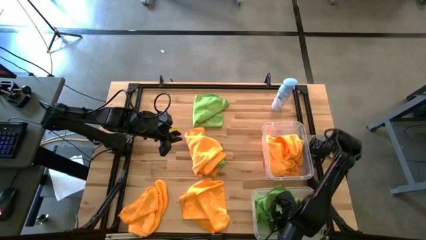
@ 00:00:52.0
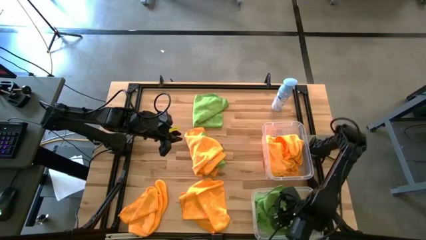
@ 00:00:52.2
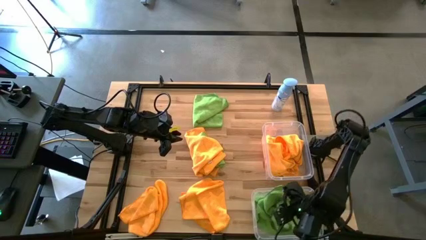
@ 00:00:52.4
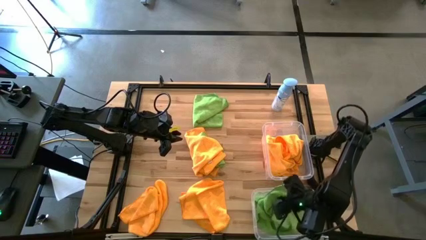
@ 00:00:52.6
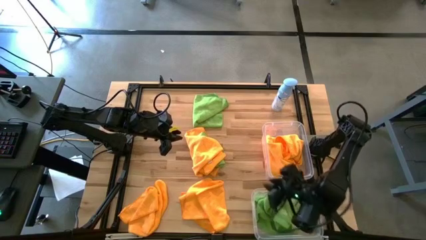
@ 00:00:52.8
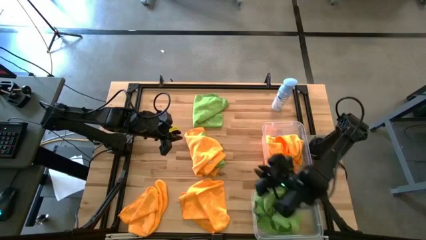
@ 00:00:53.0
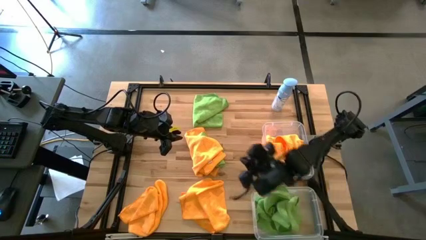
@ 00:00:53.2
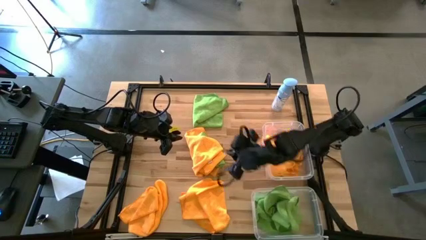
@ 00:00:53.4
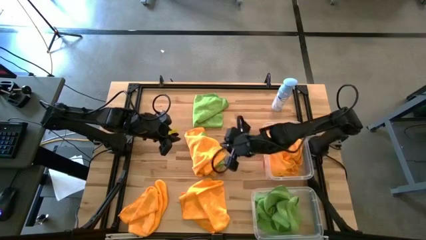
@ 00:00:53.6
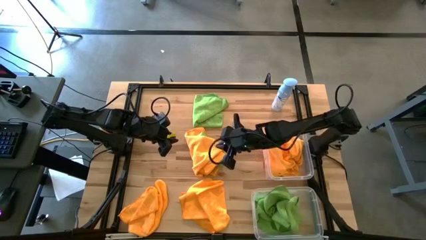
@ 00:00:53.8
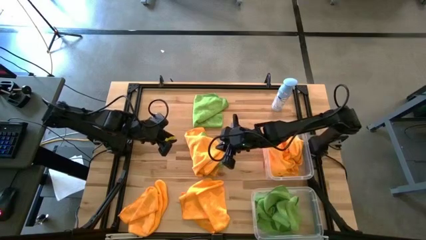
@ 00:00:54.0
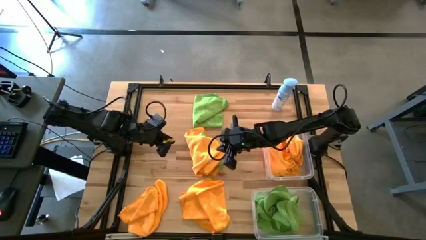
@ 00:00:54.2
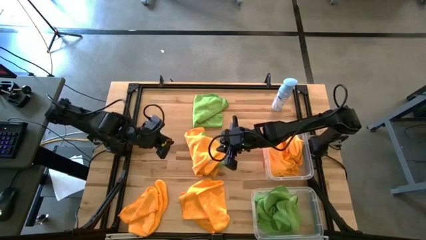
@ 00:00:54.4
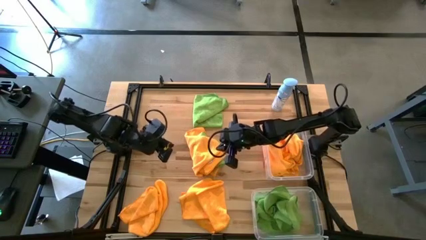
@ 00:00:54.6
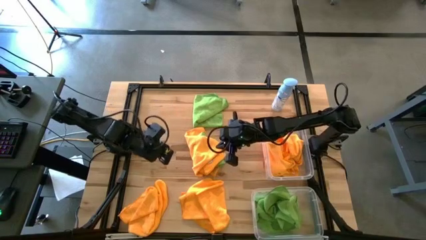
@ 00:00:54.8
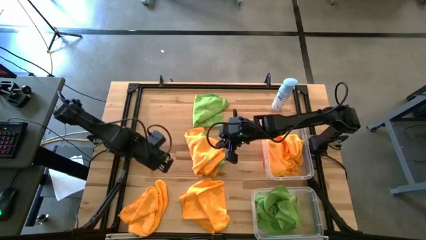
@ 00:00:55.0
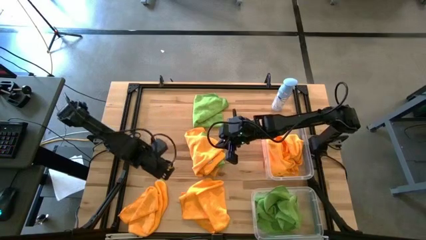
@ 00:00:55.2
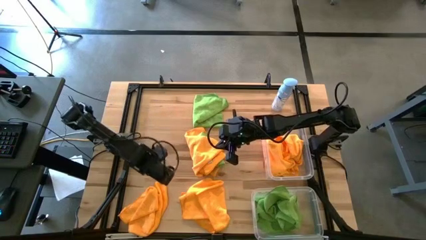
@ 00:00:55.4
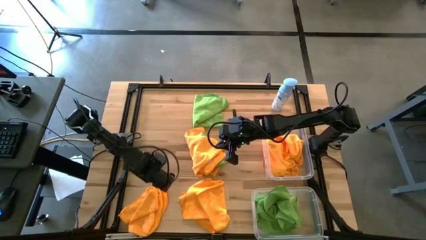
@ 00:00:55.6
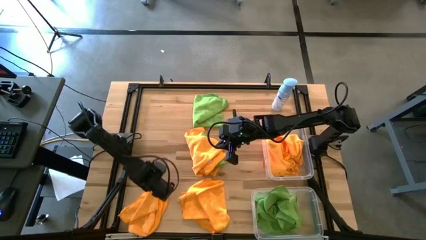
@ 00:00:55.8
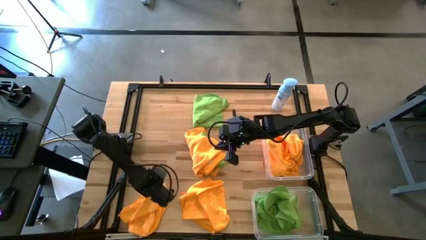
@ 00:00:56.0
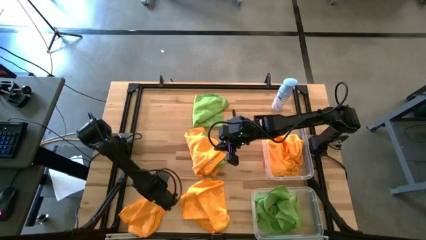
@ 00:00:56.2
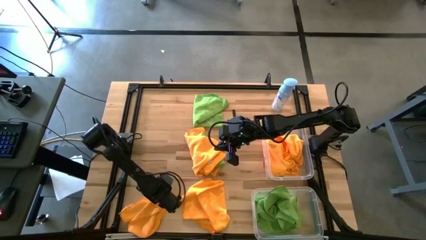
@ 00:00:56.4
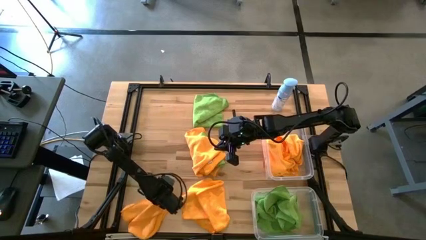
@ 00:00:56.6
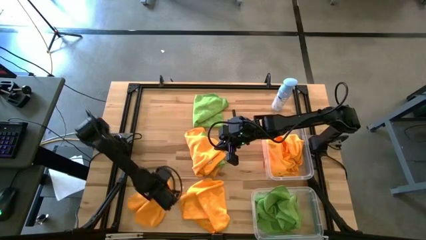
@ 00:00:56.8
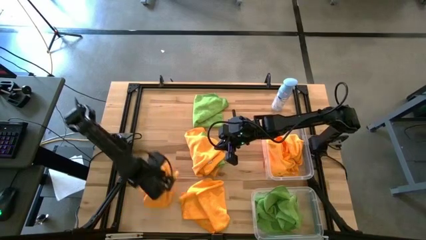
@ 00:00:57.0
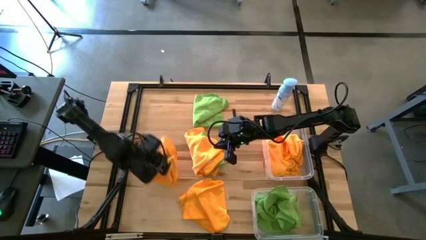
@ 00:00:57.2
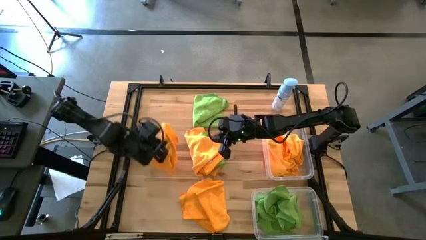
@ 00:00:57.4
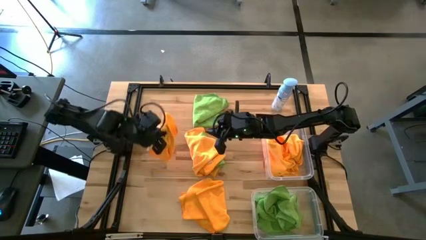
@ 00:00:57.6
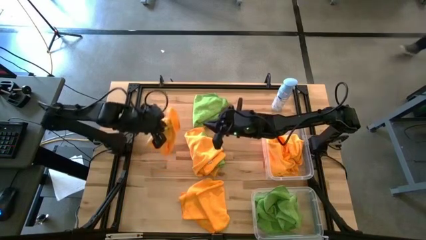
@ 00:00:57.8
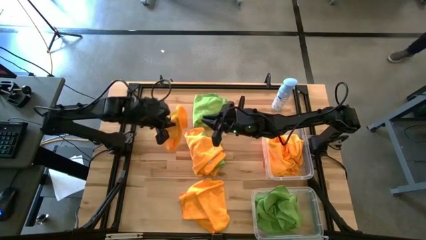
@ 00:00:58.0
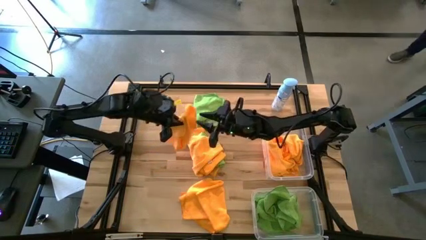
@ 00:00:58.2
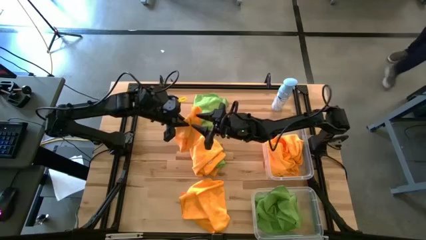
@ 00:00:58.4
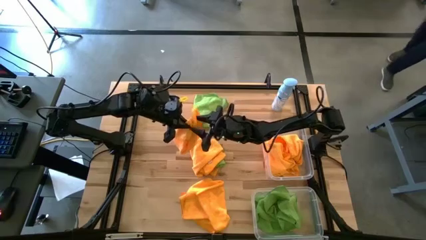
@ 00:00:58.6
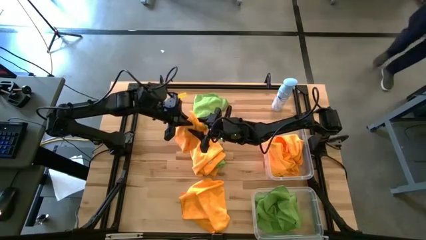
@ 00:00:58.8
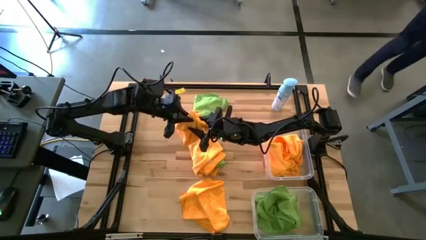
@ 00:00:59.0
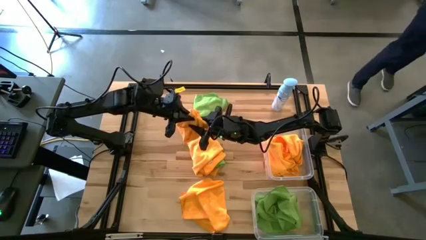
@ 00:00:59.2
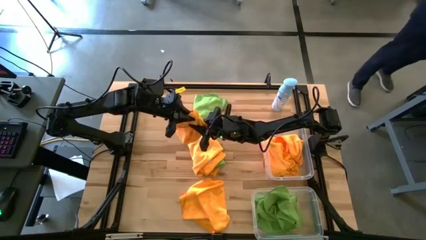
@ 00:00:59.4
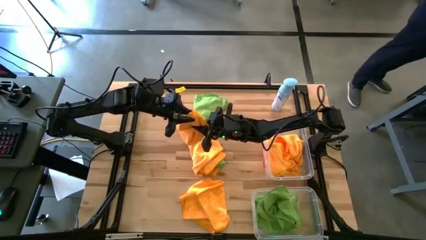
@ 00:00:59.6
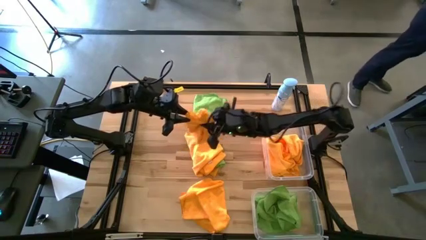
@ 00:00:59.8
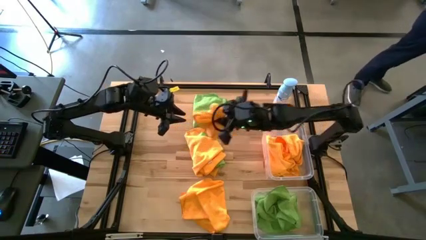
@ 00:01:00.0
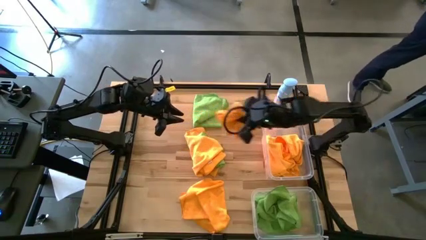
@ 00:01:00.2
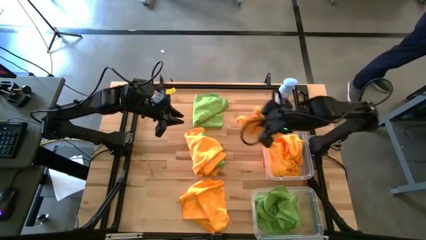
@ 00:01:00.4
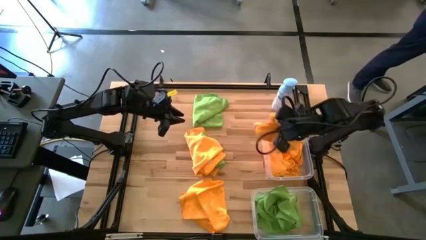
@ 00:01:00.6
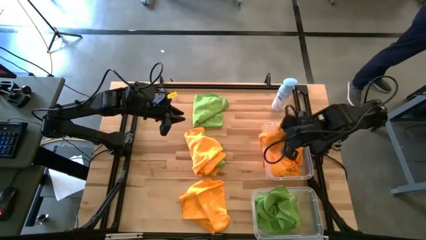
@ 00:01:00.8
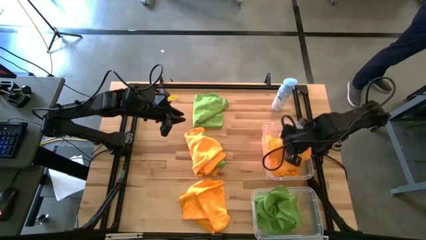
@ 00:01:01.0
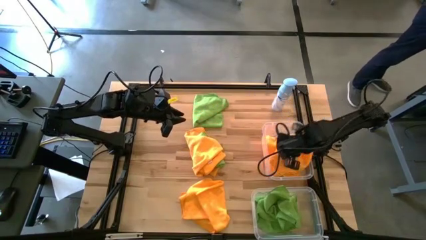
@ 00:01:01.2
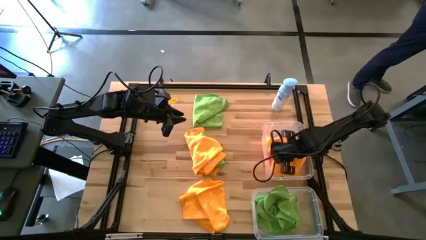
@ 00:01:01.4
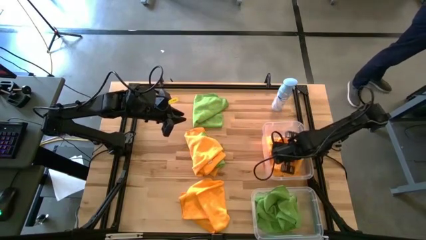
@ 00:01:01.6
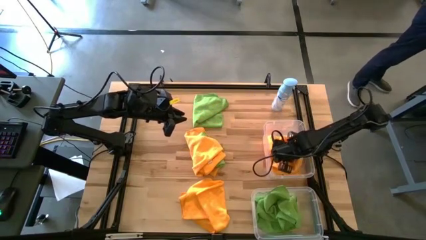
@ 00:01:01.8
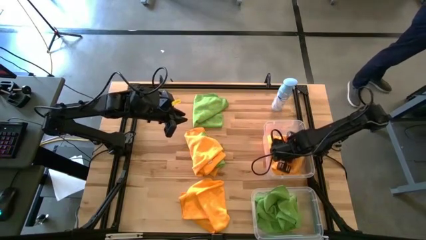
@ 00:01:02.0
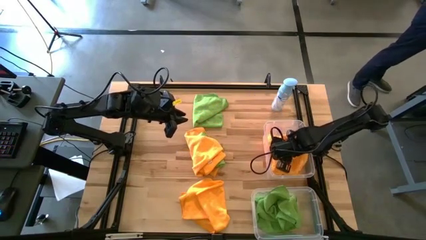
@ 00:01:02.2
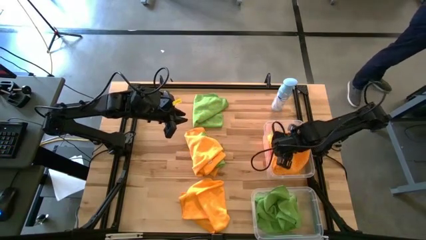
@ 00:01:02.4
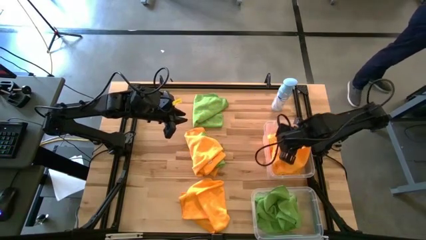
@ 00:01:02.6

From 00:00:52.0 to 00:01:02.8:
Task: Sort microfiber towel by color & place in baskets
Put the yellow towel into the top transparent bin

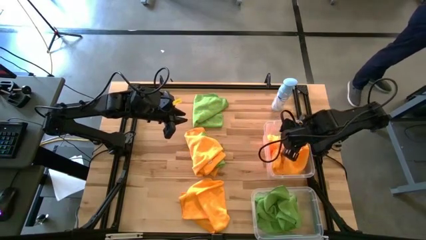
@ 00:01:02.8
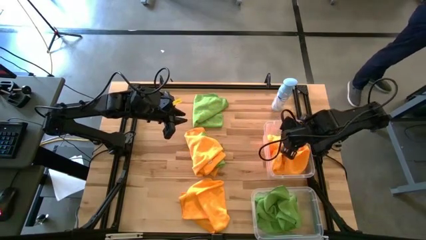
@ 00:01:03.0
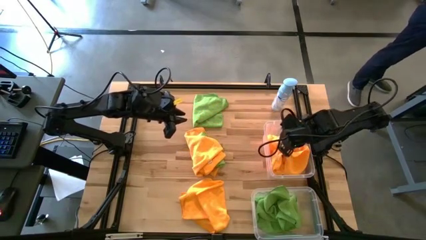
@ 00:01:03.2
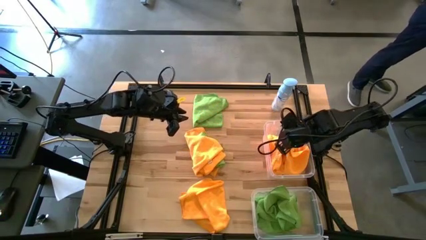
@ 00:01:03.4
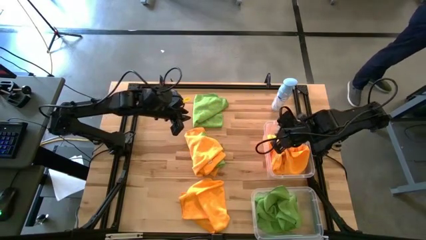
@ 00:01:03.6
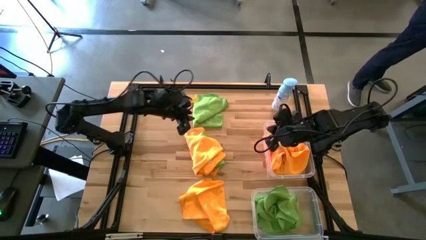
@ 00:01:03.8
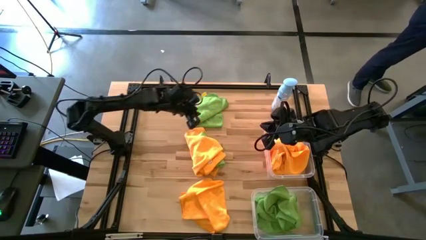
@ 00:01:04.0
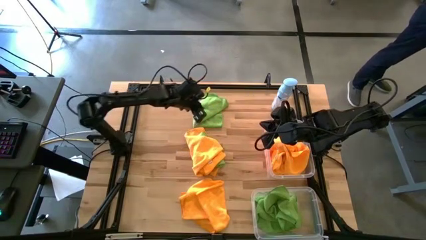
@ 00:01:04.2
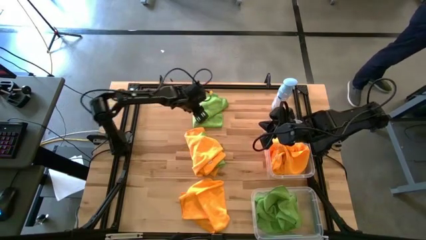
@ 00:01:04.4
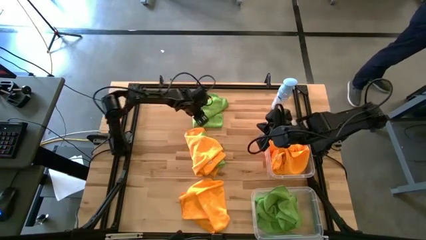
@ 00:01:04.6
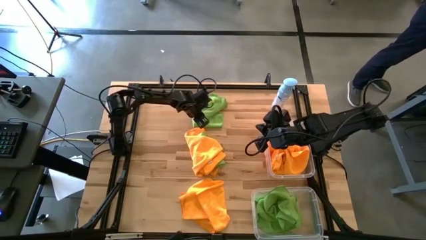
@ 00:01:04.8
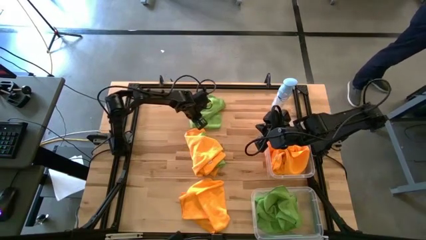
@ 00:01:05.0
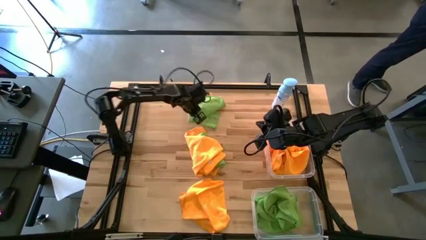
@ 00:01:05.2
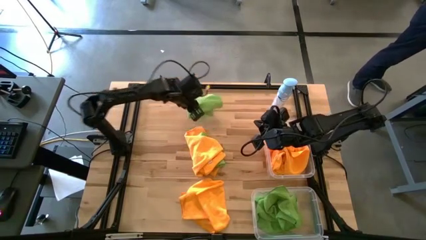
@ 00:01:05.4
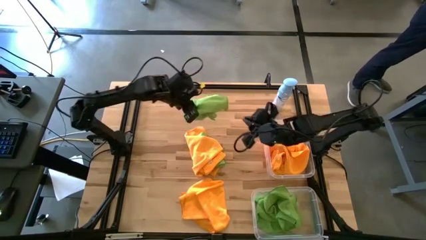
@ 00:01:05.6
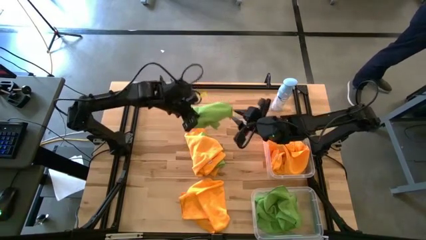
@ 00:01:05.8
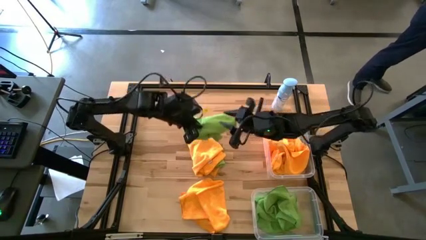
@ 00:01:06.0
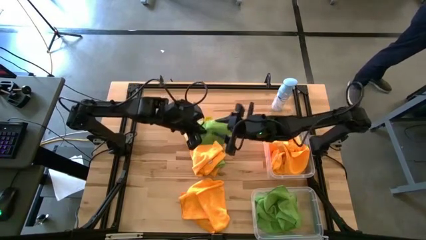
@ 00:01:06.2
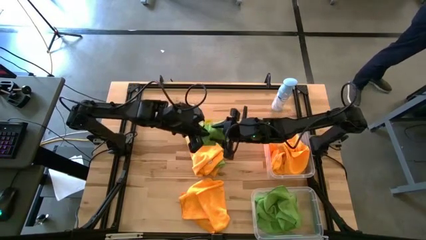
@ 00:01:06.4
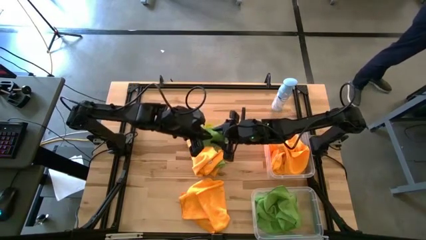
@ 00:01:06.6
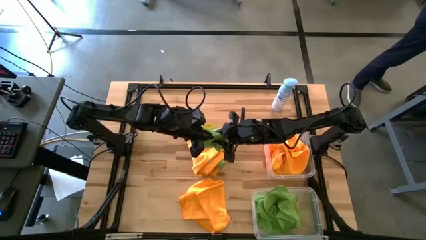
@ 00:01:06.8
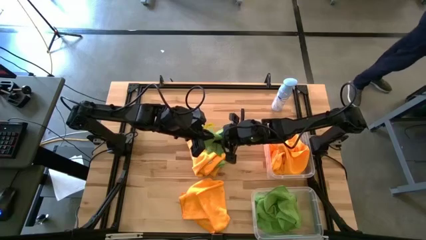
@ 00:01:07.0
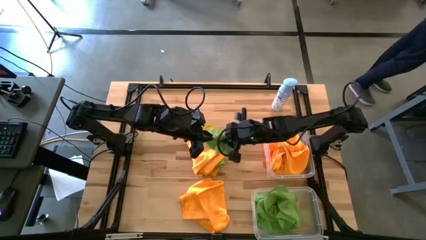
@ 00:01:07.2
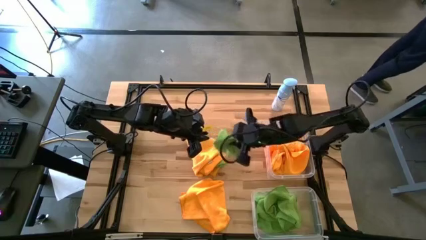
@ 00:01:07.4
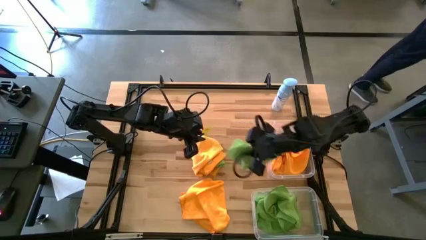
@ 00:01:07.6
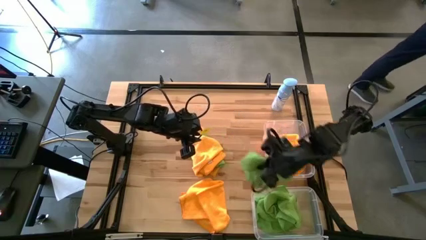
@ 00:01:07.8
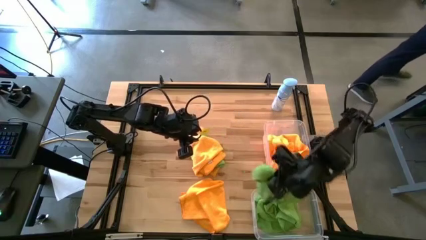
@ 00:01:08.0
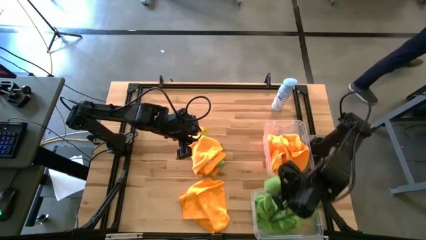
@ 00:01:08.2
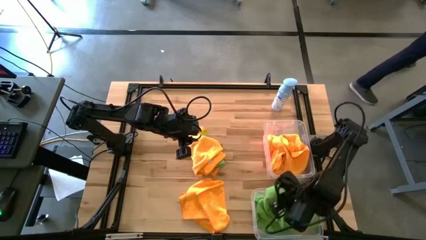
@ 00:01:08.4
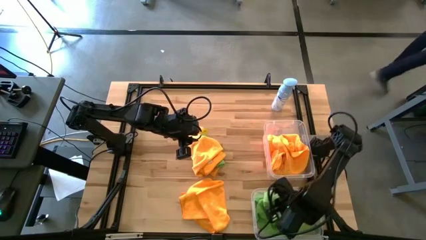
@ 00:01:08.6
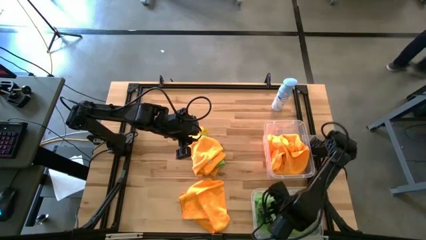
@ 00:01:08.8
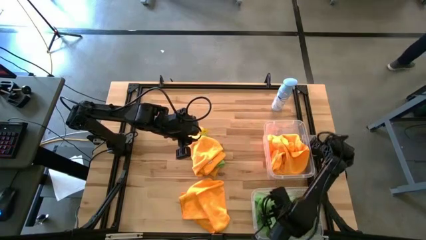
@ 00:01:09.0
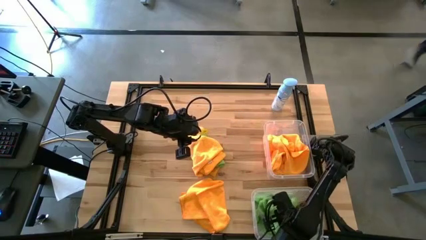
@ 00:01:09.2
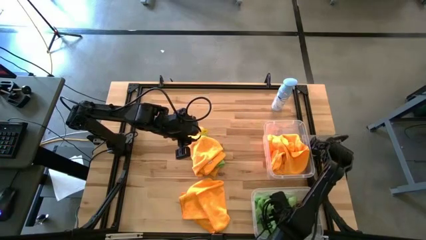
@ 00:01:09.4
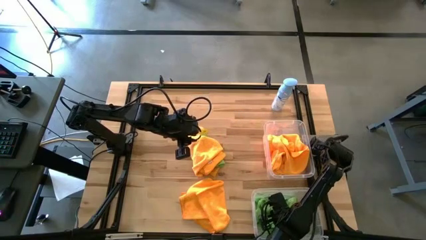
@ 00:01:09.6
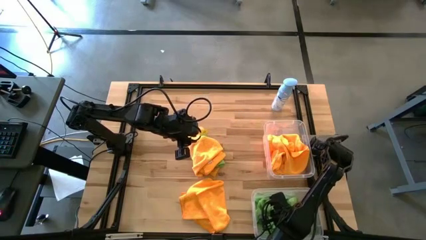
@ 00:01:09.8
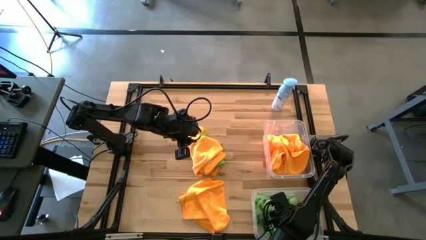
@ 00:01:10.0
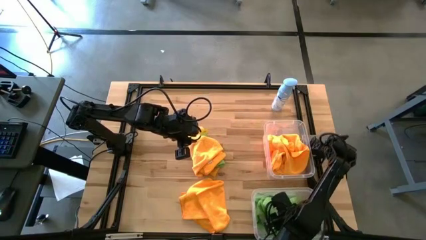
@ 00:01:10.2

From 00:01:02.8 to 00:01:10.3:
Put the green towel into the bottom transparent bin
